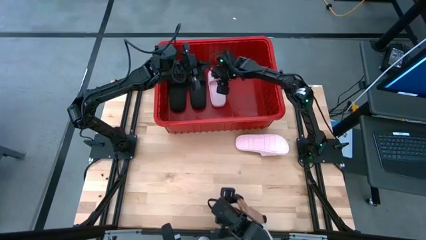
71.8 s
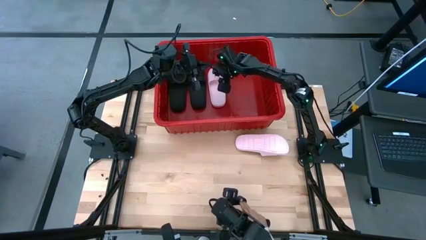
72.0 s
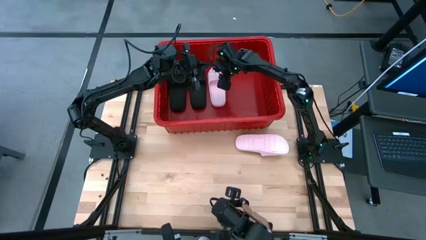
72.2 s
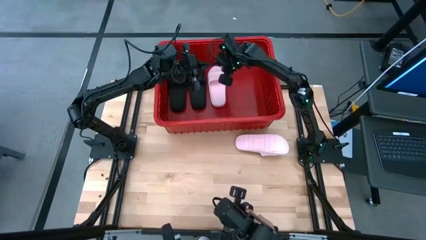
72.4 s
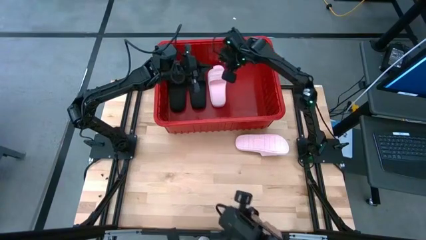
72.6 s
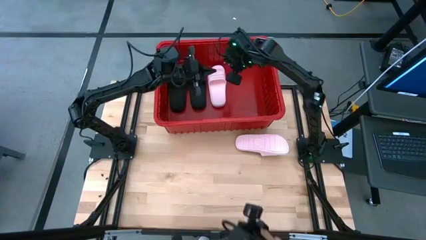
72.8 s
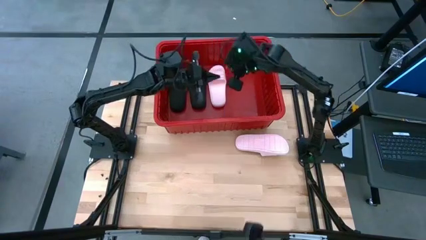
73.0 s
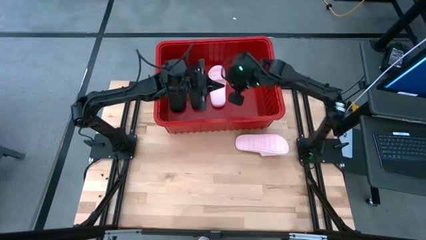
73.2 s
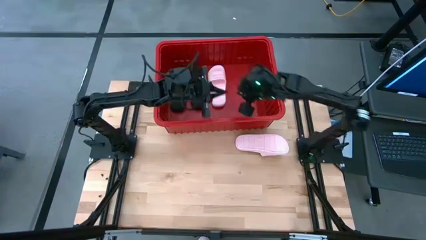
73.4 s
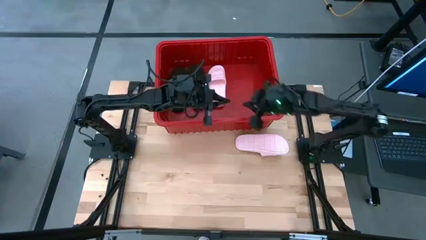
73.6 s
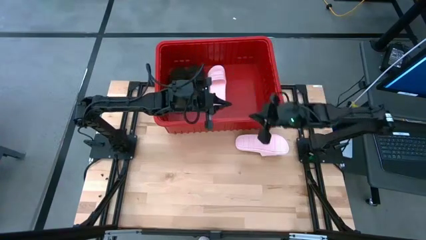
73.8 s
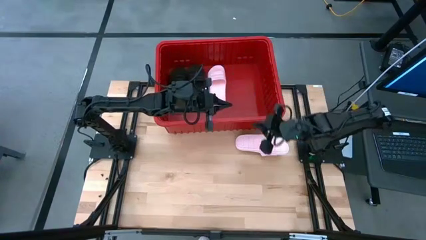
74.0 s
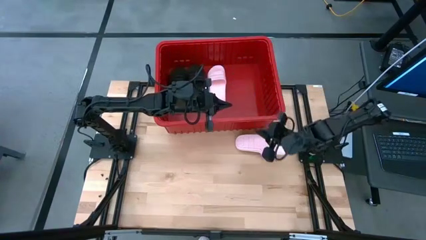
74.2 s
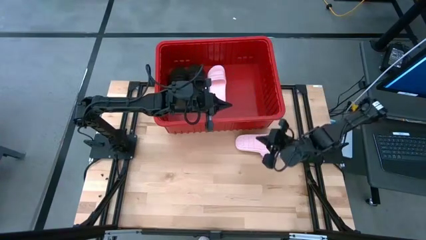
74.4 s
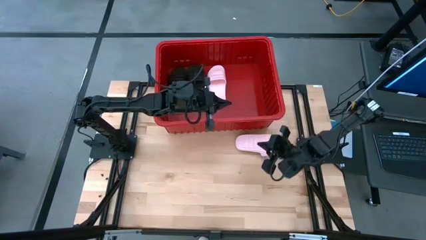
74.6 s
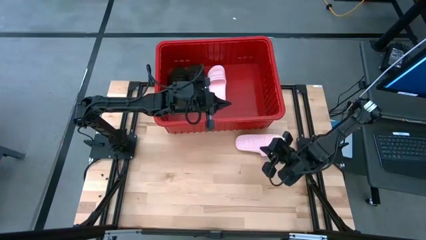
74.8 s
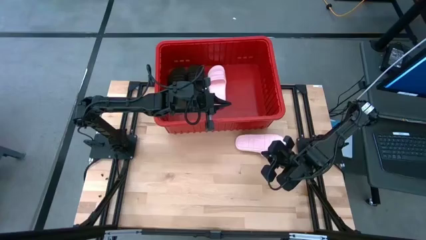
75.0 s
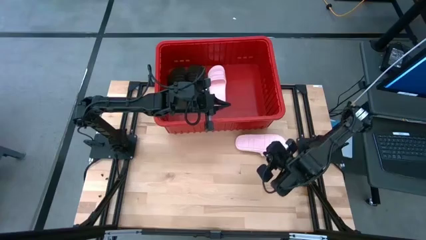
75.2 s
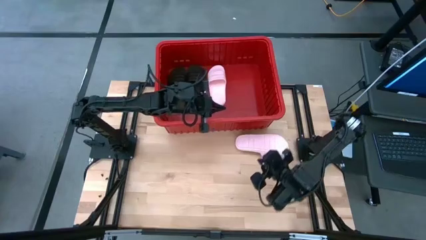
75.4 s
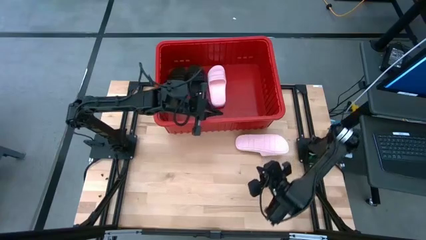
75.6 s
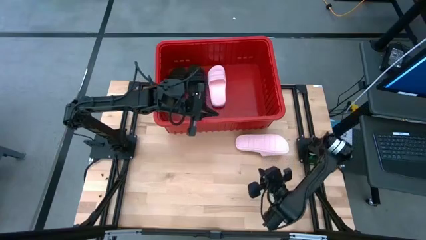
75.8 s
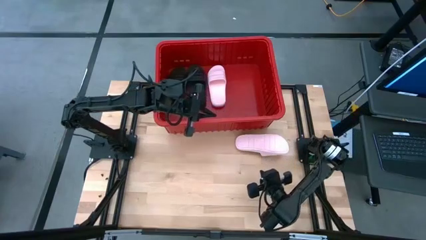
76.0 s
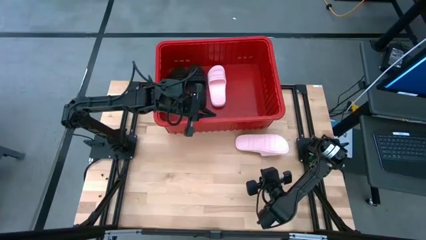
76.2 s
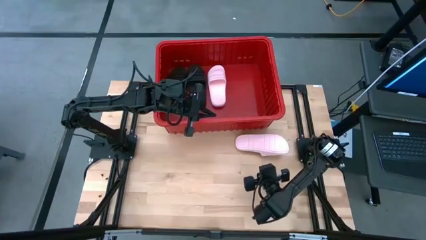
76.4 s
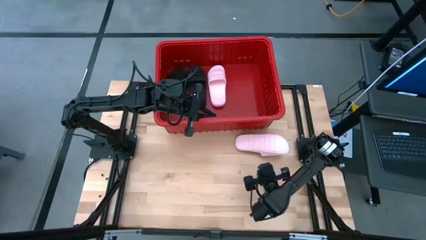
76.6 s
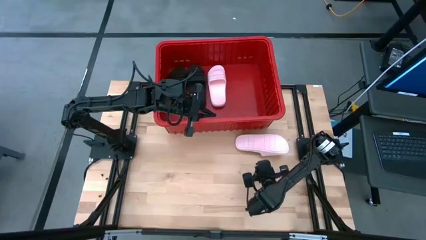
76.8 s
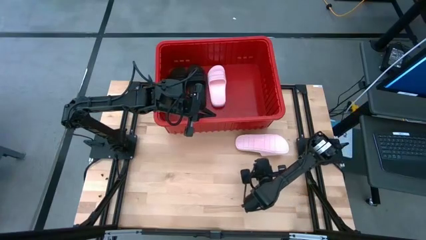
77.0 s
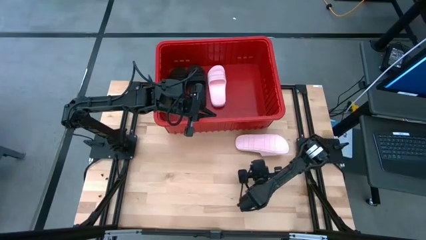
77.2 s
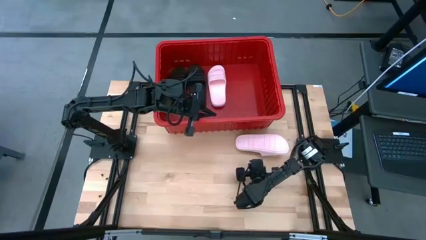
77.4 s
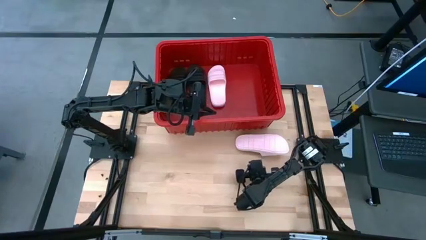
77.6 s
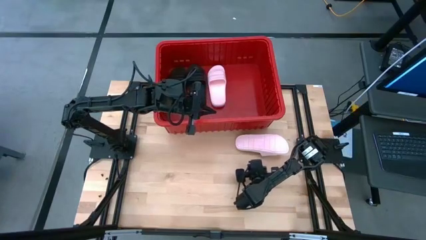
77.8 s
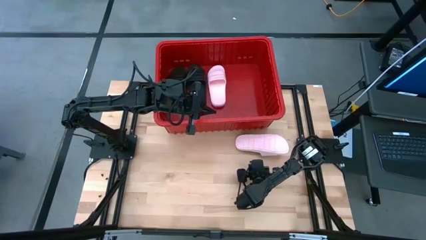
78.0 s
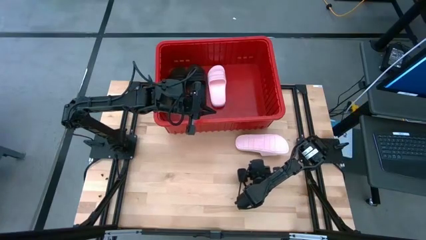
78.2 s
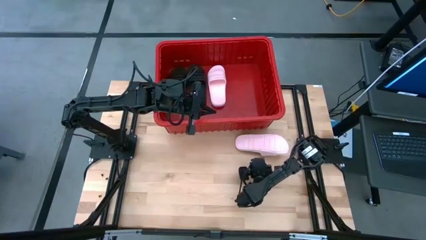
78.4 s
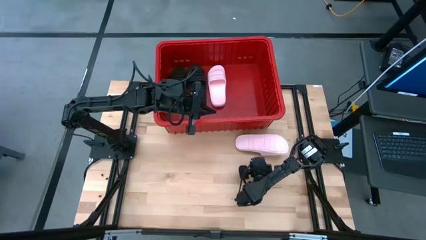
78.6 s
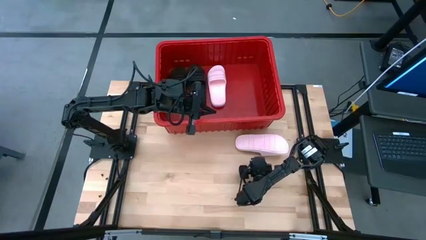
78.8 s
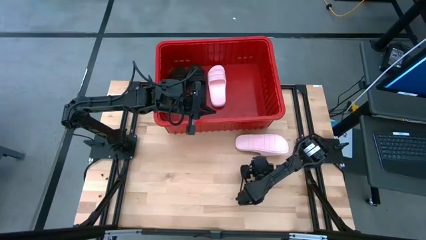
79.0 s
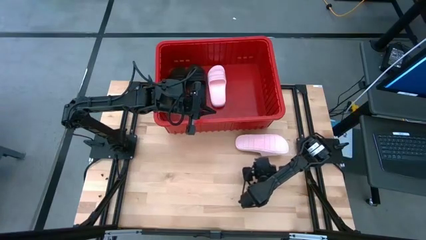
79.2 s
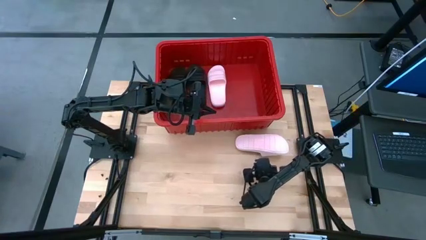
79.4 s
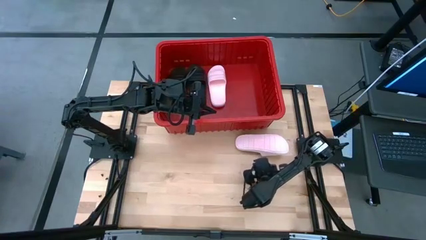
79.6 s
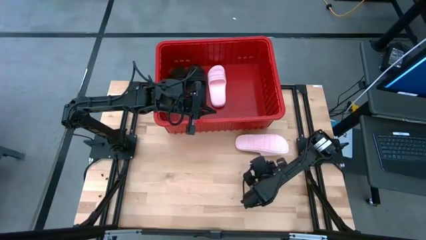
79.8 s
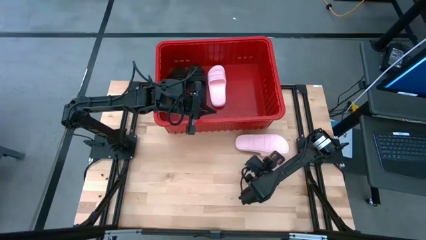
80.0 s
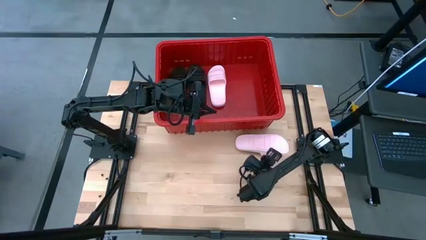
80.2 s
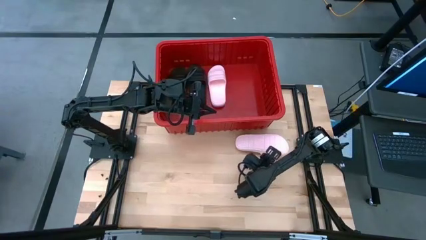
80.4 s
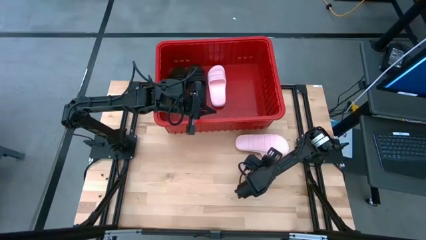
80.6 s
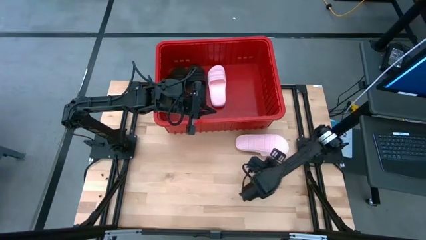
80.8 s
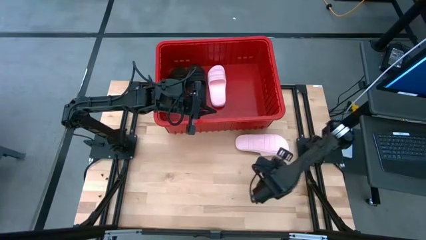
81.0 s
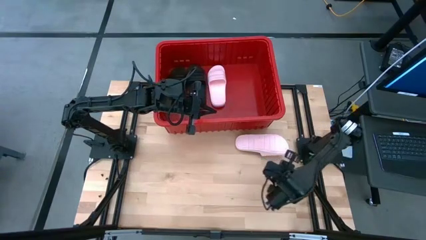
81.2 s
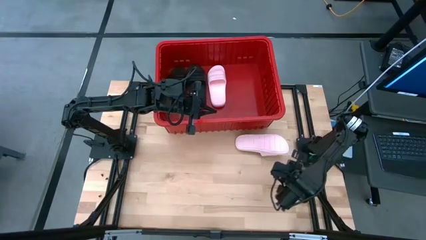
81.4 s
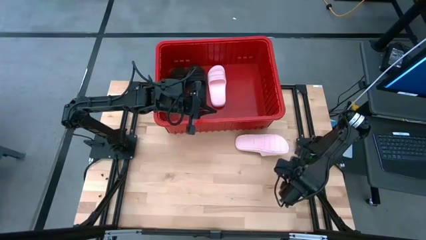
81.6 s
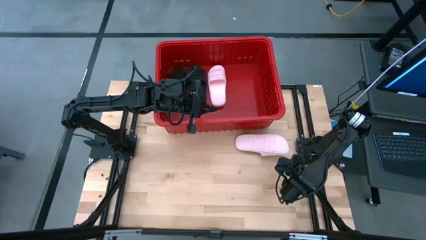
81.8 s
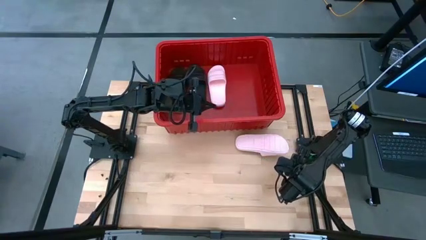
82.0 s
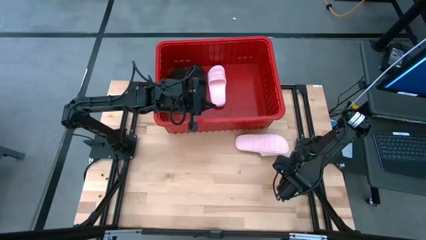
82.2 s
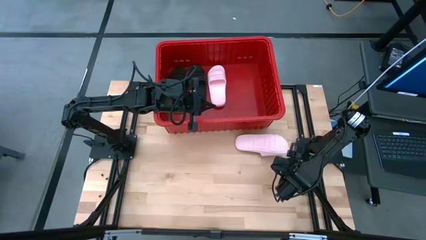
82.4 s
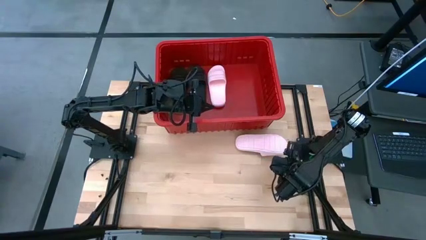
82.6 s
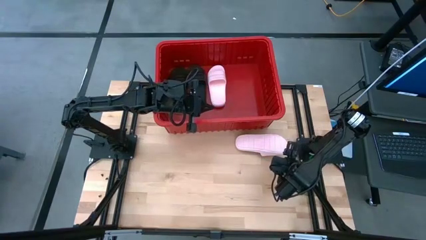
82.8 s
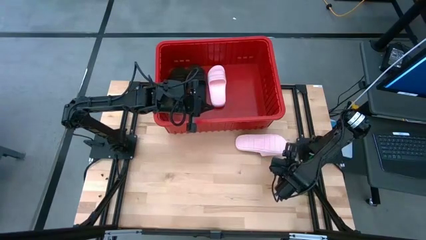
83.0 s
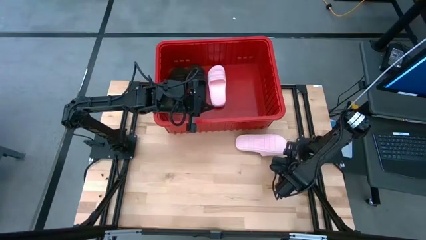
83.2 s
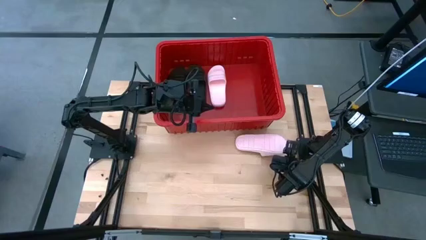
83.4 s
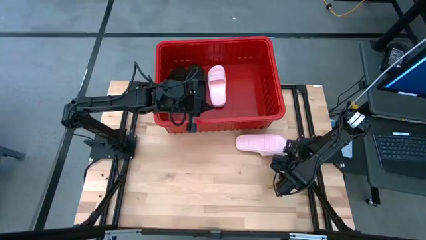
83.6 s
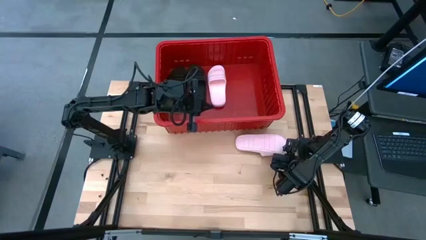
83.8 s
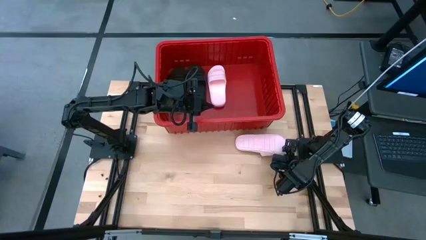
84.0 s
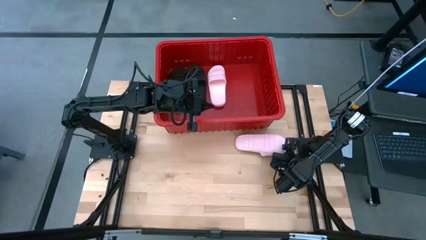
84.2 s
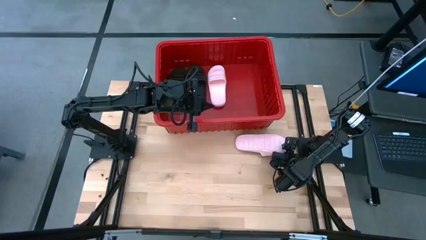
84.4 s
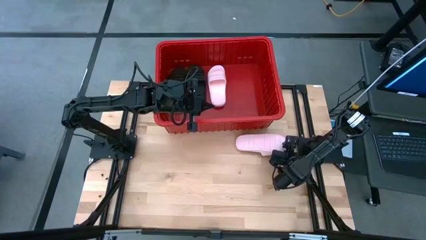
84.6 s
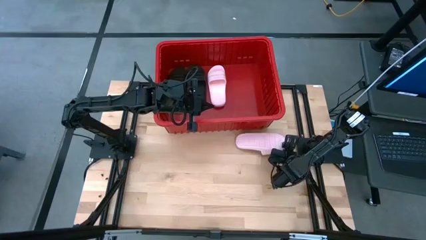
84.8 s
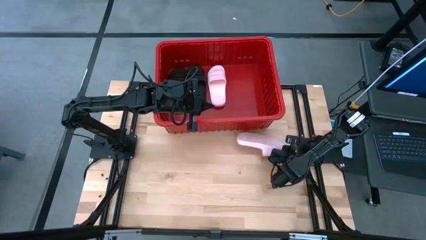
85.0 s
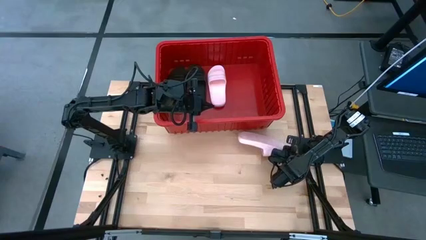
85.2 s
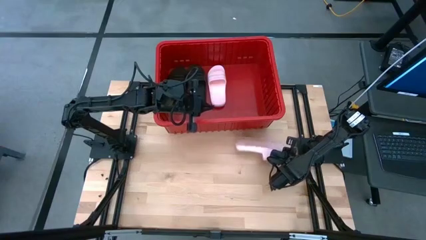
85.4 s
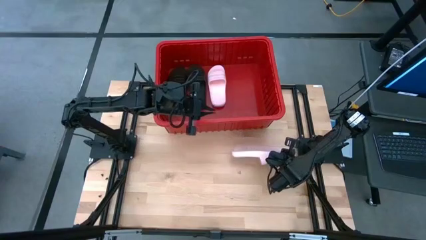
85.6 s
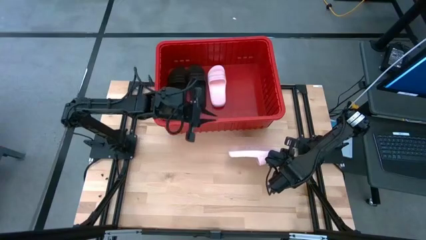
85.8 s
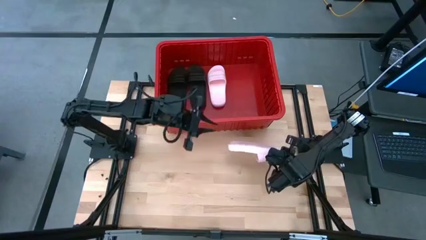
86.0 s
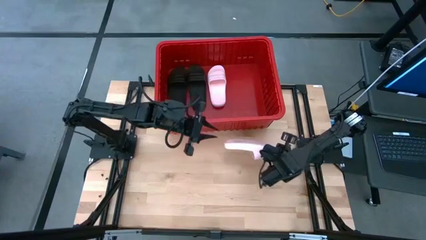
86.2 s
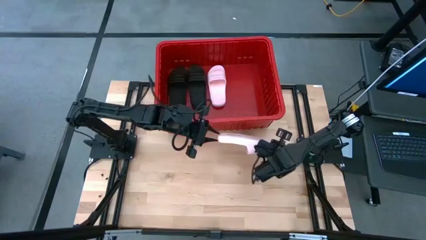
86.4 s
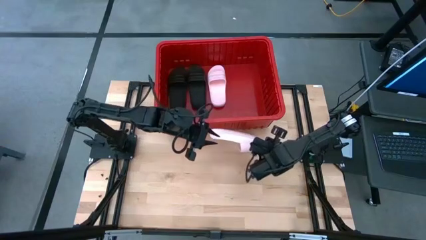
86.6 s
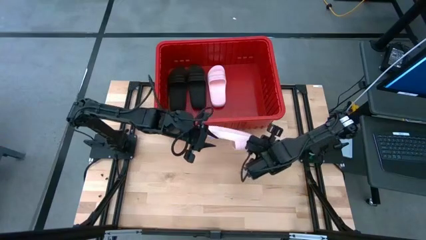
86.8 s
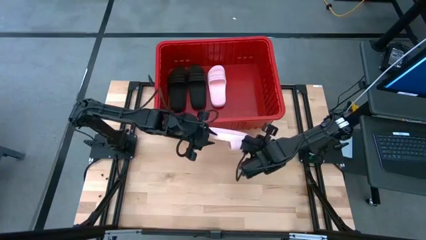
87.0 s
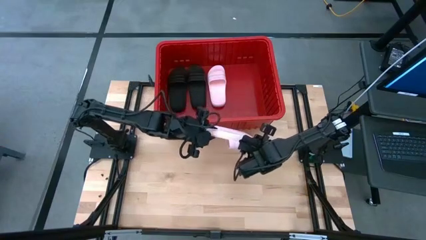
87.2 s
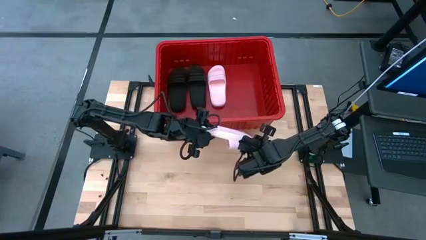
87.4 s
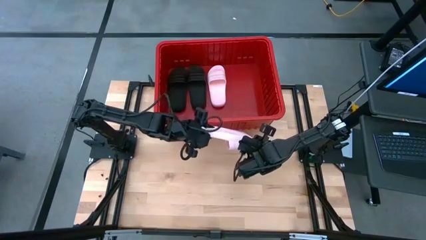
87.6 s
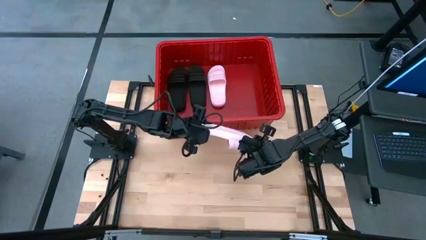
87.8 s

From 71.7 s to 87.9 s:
Task: Pick and place slides into bin
Put the pink slipper into the red bin

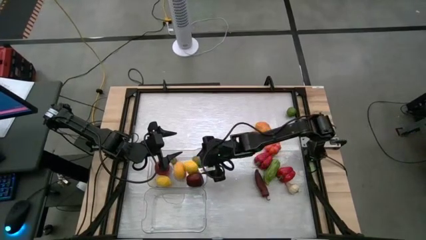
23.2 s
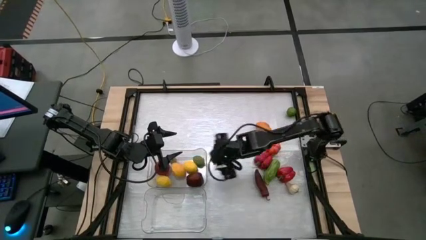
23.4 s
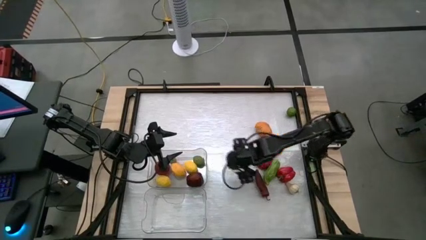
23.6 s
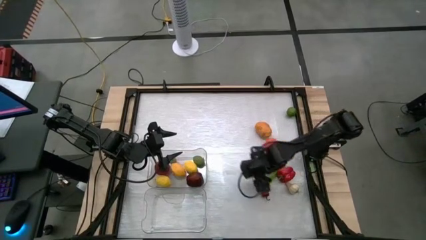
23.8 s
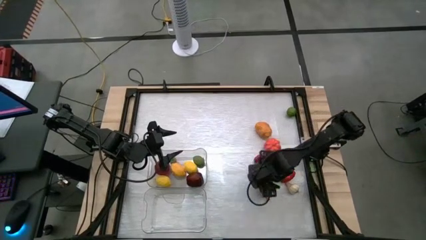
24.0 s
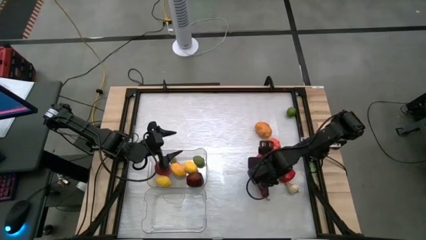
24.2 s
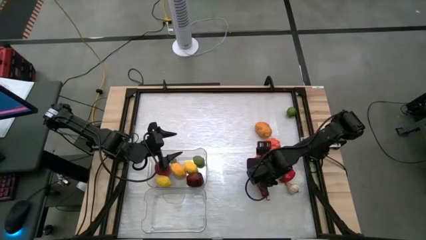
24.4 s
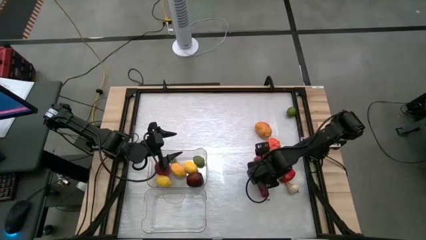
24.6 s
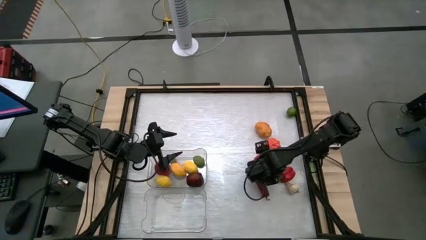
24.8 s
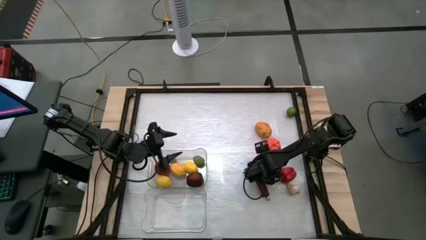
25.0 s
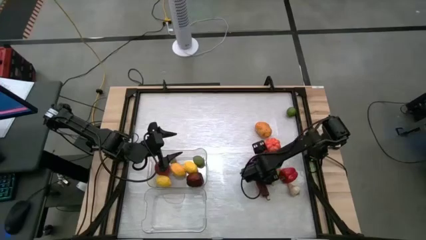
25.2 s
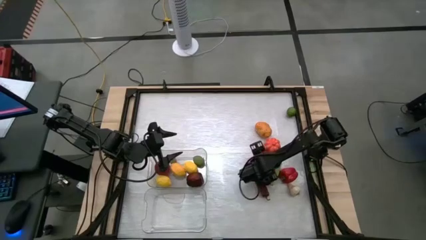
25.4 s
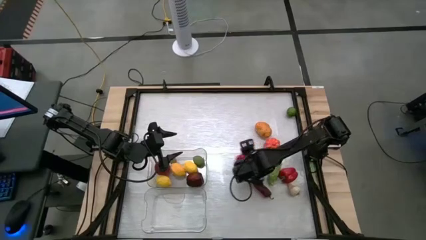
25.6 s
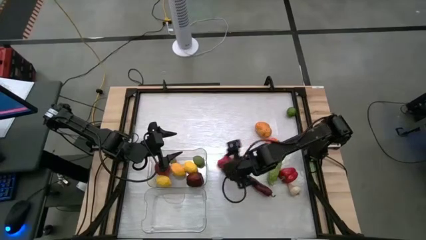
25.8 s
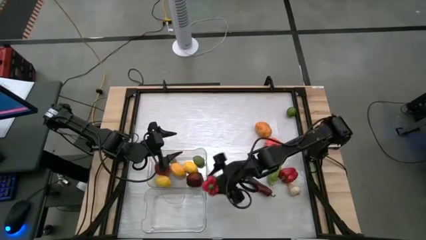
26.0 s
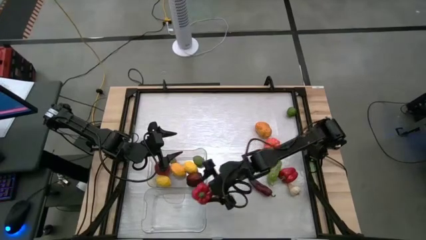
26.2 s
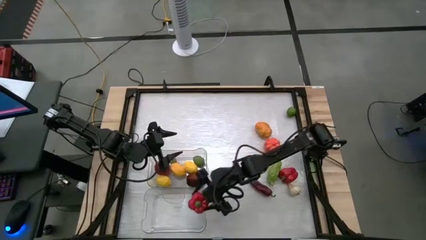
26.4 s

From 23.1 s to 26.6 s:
Task: Sort produce into baskets
Put the red bell pepper into the bottom transparent bin
